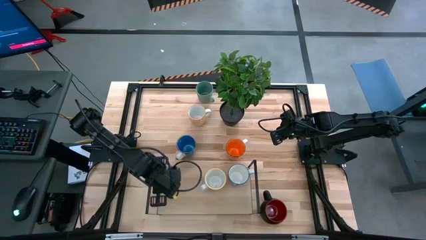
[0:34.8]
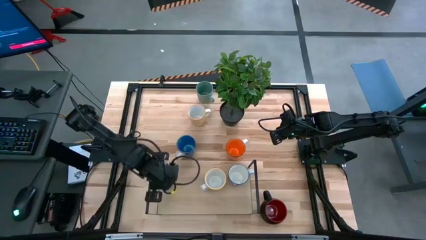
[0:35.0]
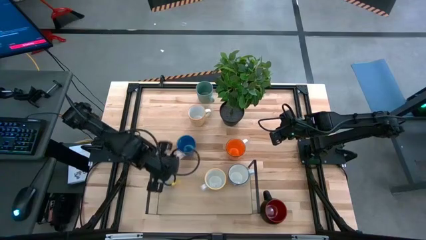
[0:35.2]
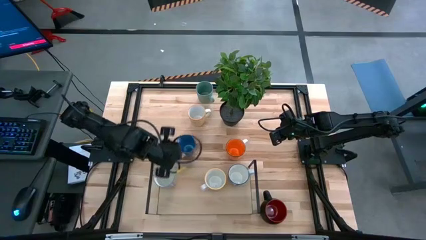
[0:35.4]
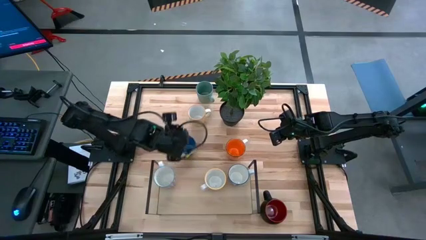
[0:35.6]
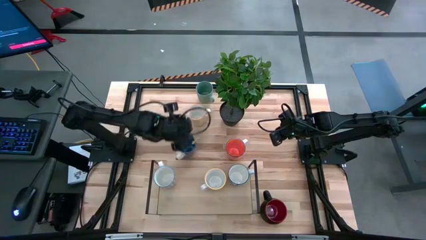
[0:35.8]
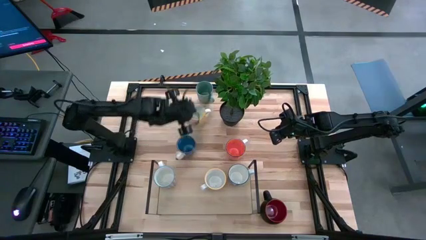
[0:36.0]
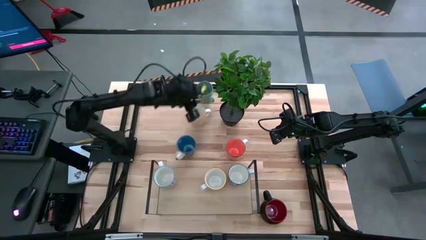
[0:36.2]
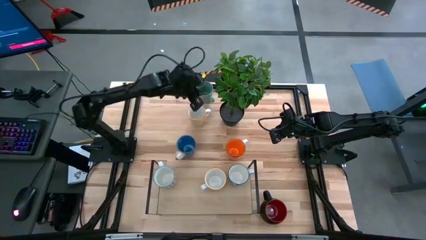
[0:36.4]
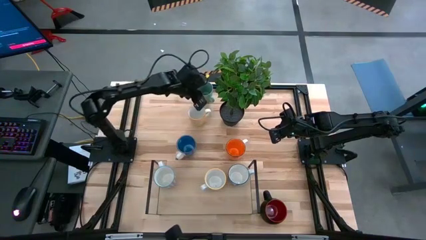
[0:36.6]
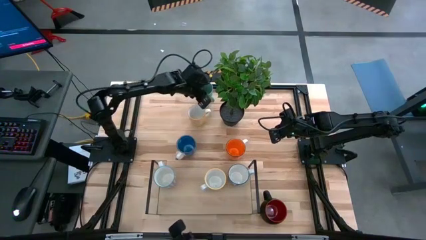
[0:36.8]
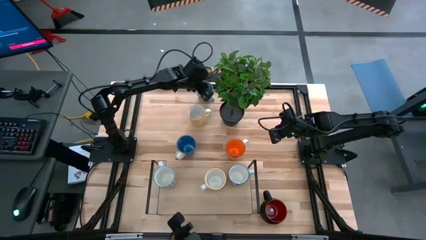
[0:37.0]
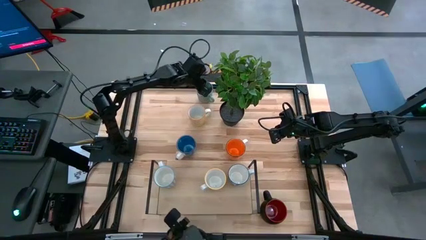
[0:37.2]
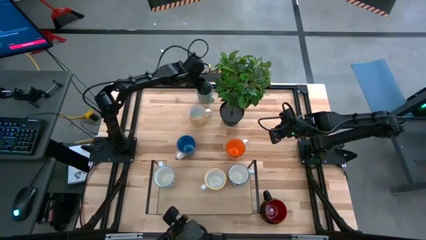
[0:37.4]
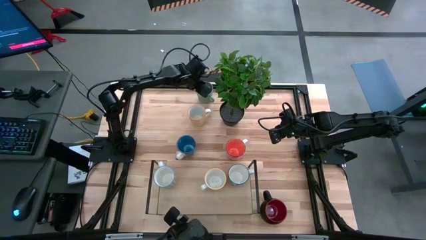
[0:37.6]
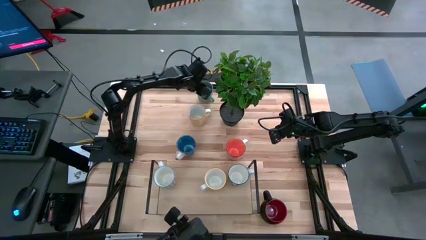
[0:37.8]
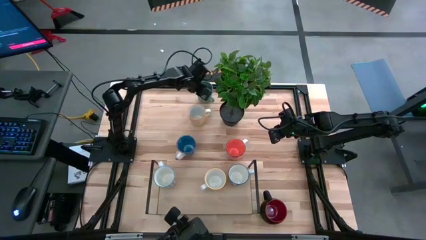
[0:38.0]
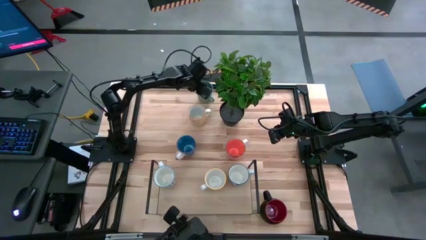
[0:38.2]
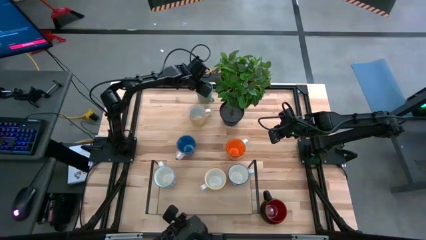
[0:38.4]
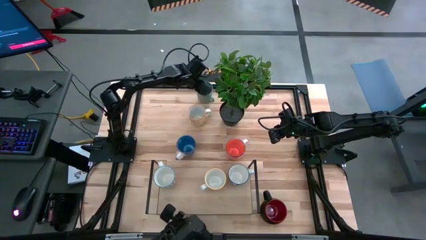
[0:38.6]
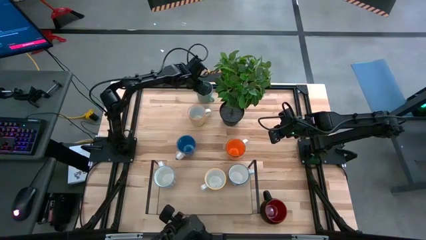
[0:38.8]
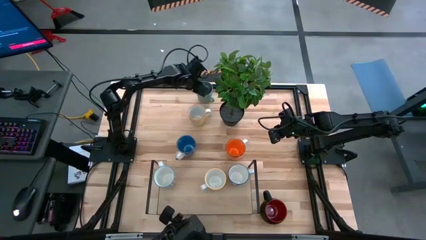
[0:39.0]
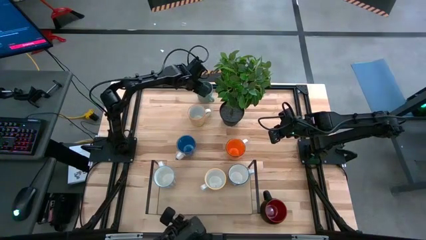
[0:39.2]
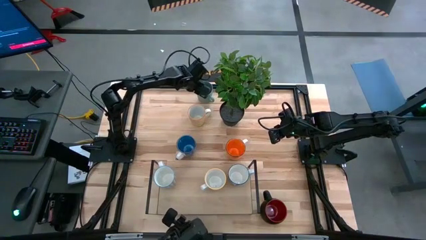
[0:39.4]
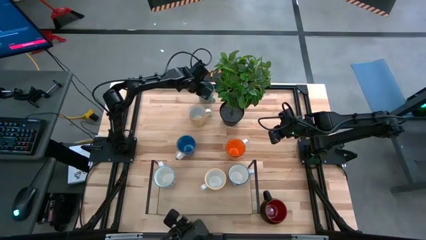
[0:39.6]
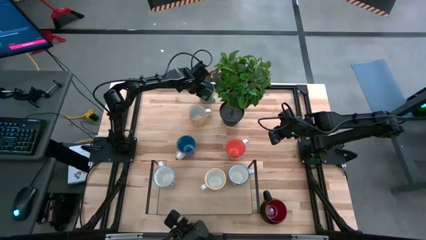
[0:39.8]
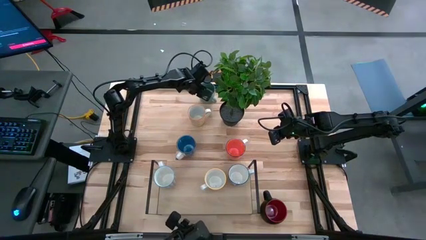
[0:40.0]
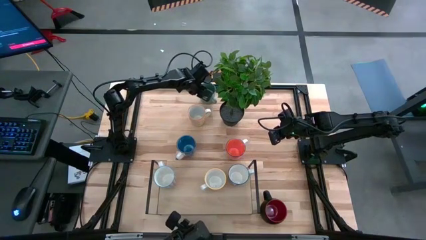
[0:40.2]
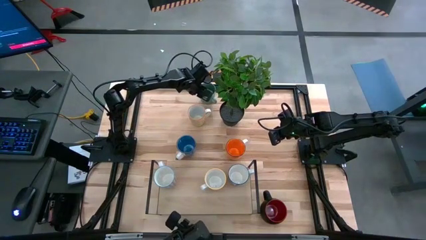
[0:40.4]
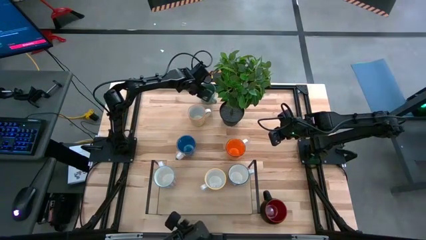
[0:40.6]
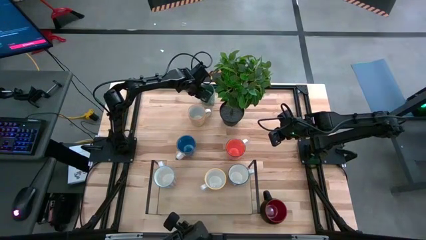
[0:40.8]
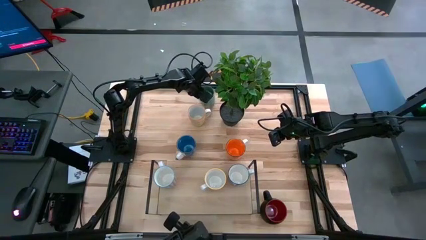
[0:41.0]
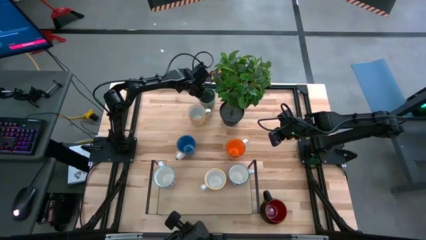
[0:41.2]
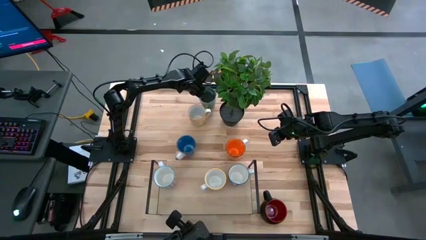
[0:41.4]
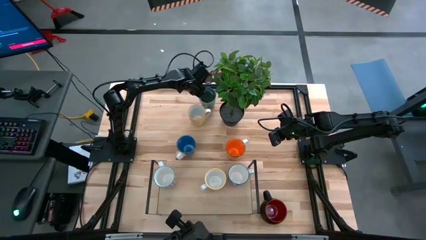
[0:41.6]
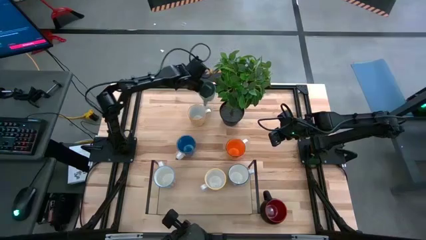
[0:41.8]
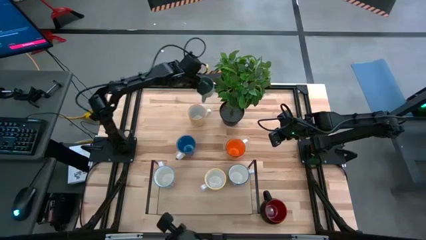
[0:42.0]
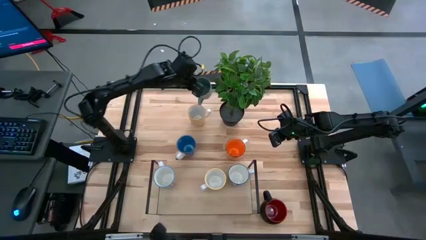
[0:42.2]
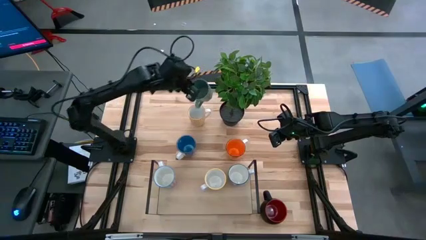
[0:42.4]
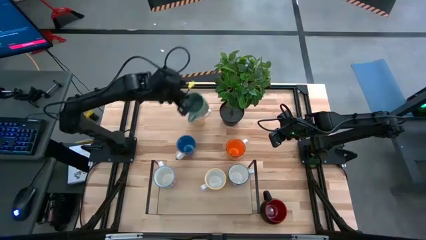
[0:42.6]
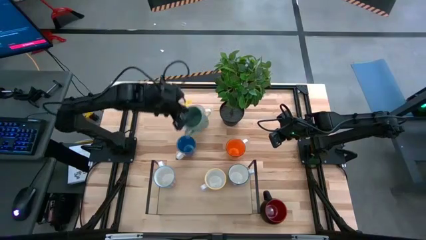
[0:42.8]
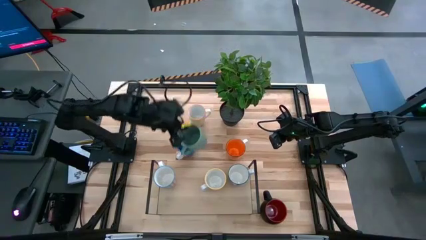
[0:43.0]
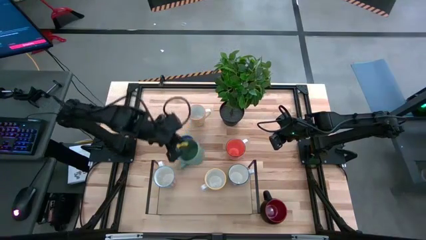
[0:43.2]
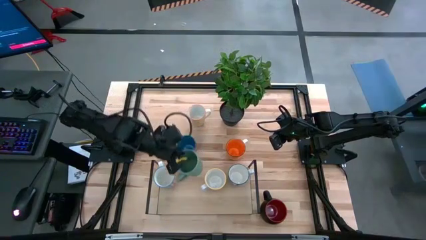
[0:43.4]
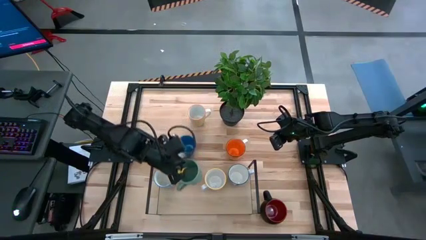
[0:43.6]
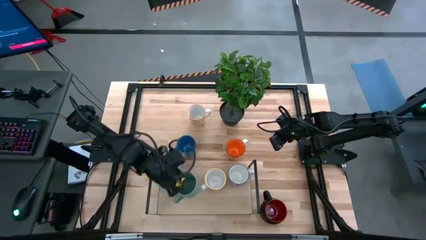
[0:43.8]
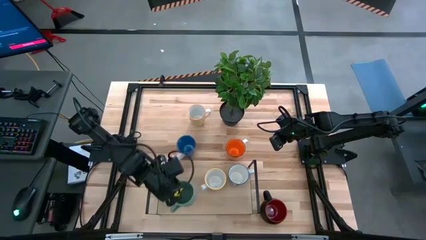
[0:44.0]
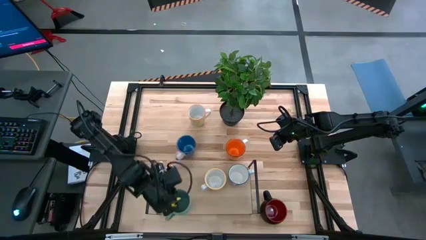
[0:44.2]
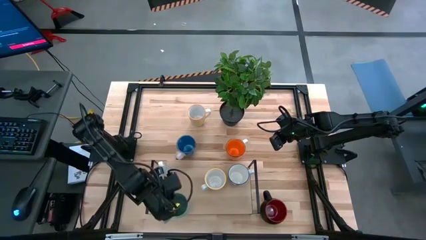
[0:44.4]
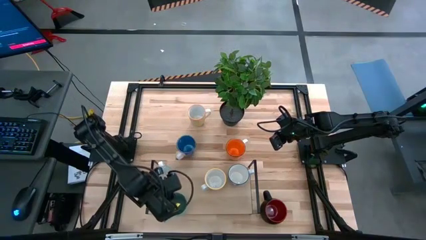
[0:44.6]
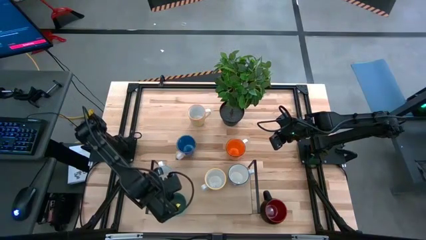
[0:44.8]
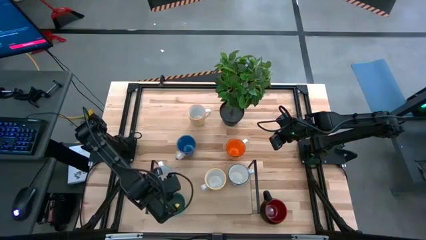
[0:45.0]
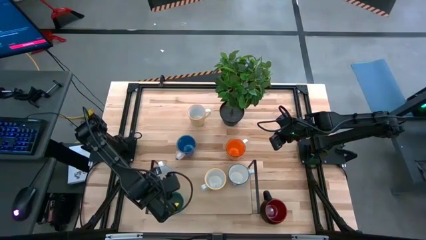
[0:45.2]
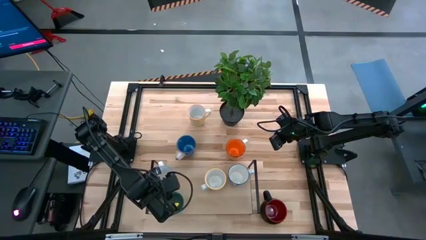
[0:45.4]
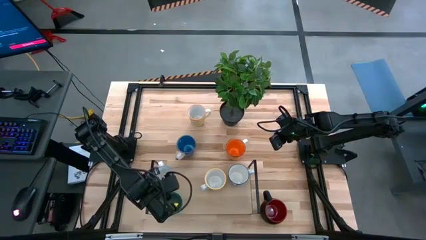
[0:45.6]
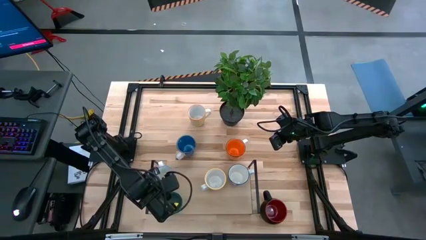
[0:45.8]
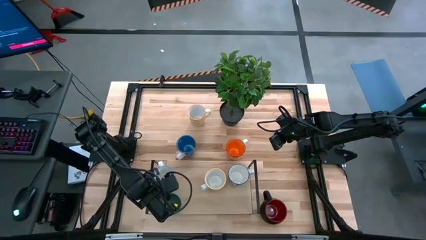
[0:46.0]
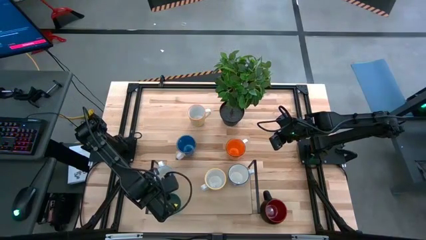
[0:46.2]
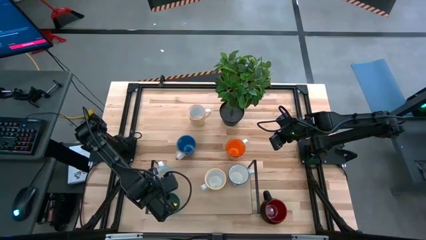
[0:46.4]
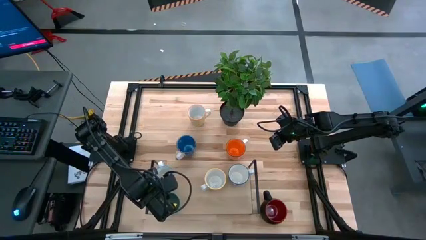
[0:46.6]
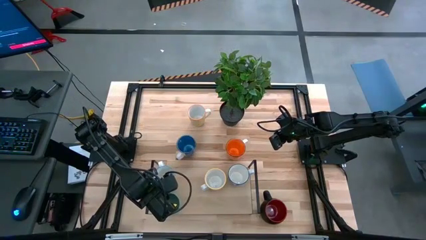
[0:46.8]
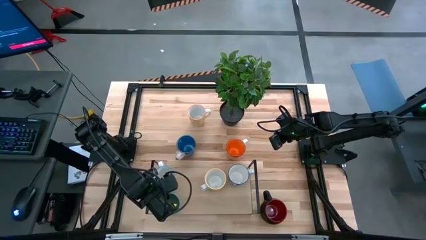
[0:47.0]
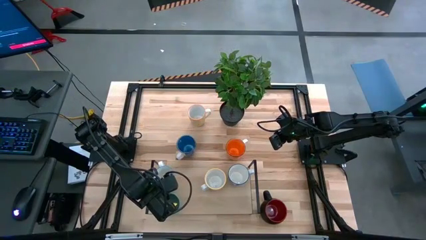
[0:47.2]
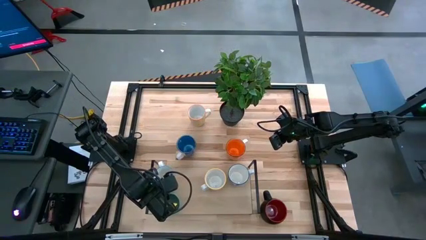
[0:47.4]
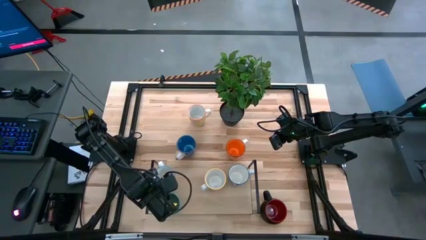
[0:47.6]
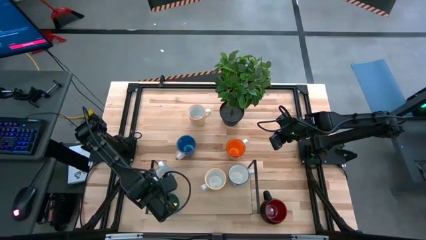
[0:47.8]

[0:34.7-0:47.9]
Task: Place coffee mugs
Put the green mug on the shelf

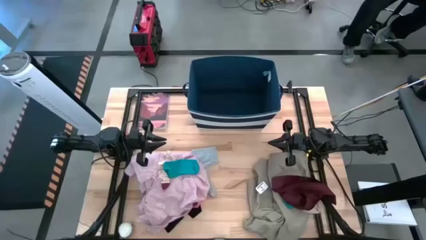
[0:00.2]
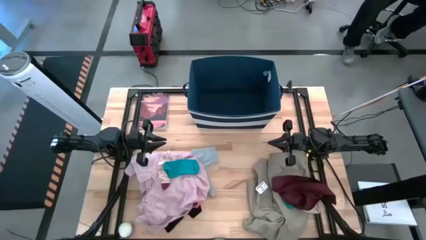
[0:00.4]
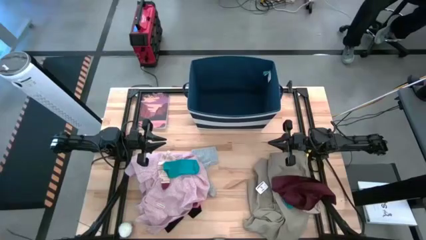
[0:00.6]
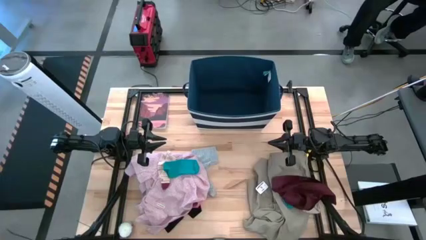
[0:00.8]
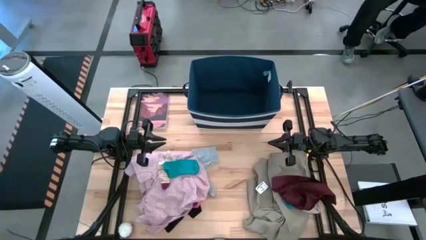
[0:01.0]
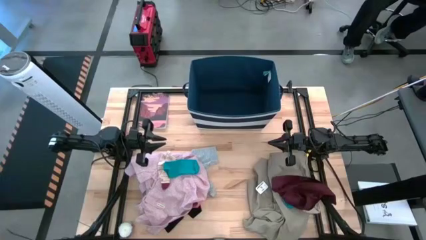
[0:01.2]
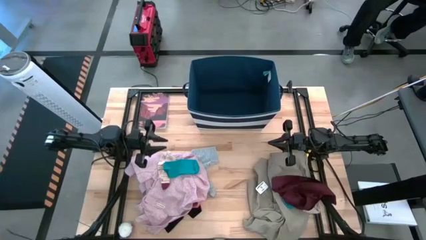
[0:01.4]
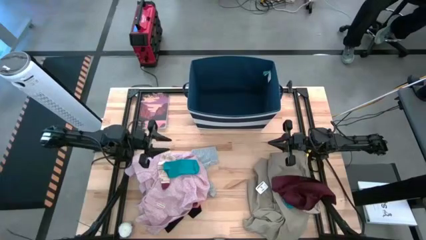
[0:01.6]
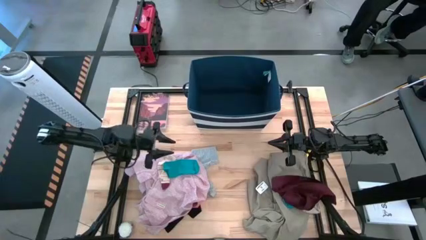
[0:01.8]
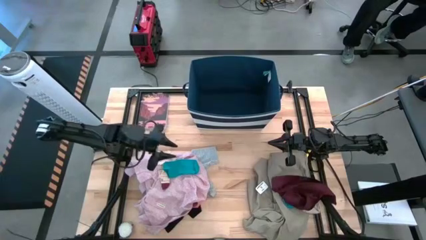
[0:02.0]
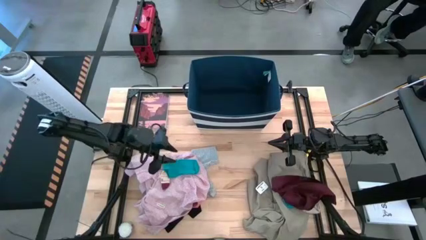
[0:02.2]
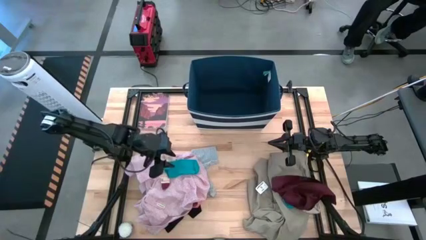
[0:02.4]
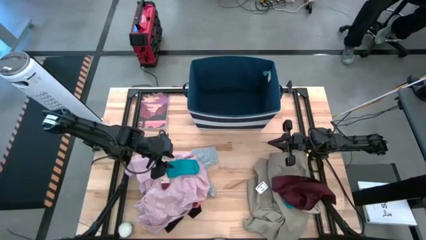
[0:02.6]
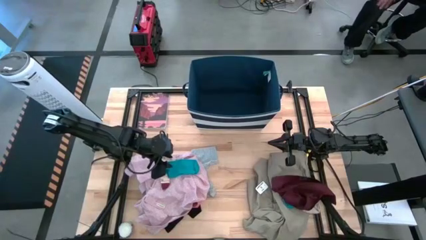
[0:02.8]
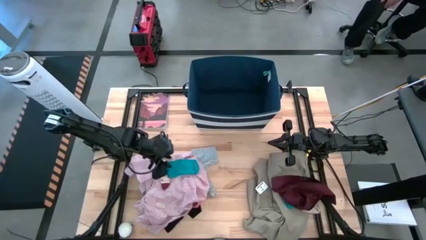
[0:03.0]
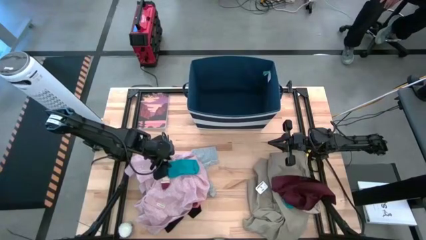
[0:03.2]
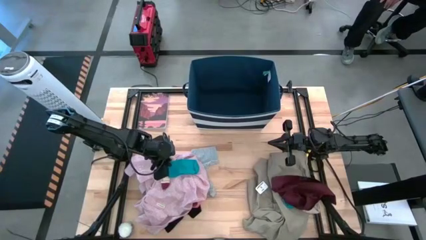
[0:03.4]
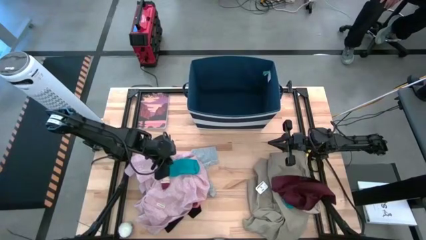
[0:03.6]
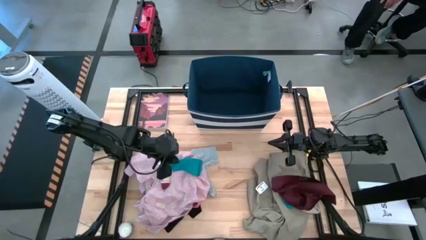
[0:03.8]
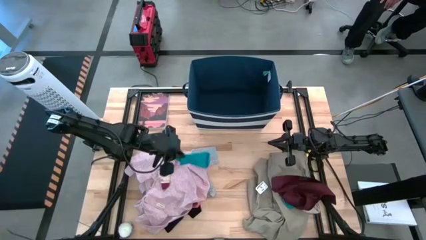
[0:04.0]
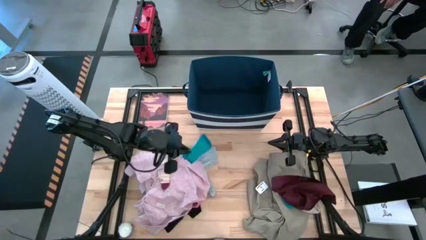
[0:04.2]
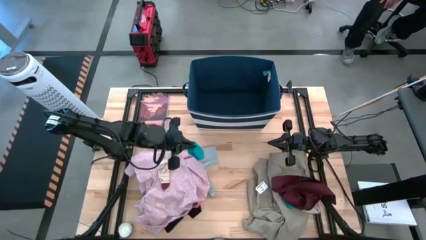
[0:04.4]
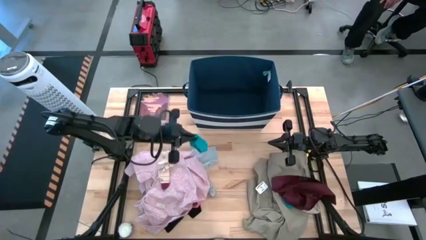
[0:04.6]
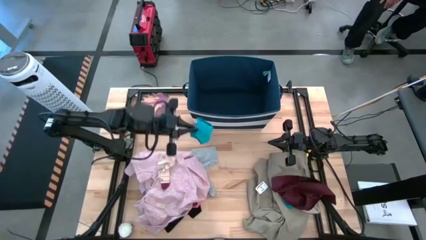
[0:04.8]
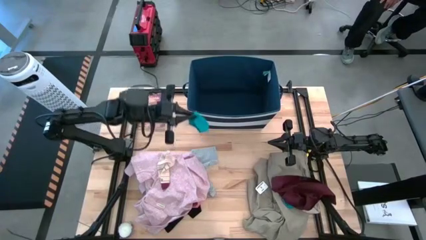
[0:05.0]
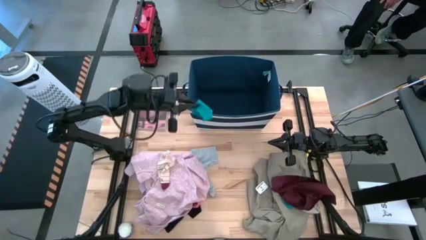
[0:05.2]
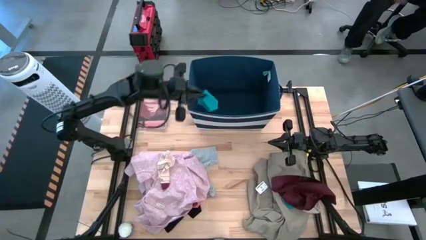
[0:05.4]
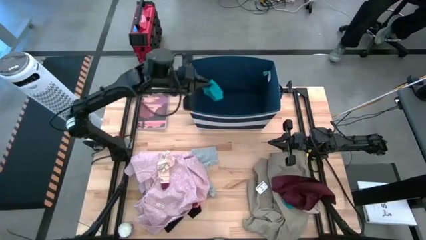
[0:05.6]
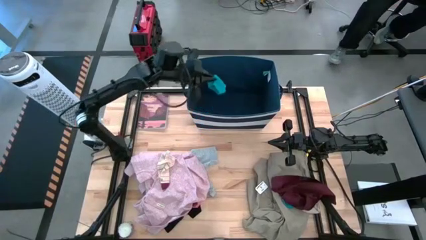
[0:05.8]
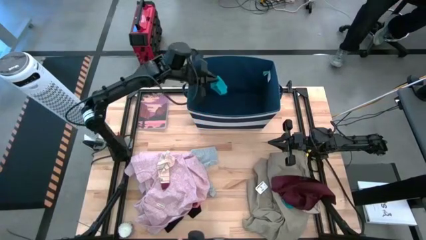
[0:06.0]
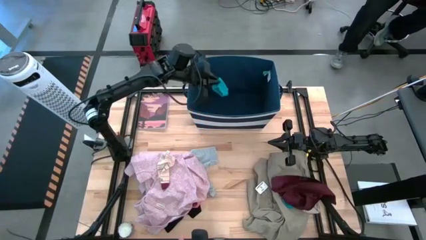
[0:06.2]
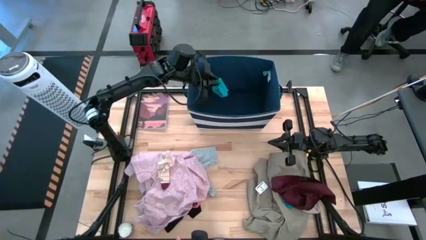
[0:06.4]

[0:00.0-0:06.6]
Task: Sort clothes
Put the blue sock into the blue bin
